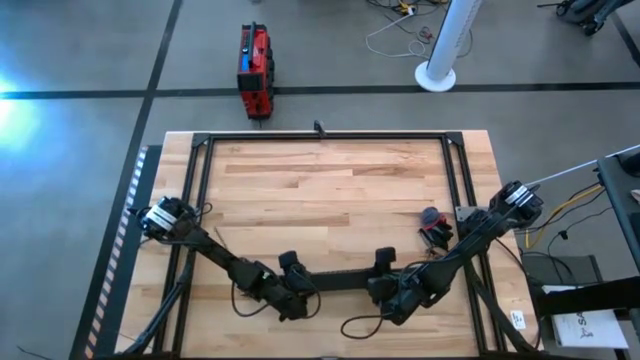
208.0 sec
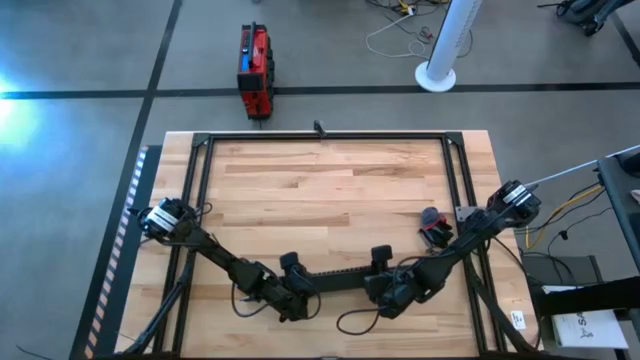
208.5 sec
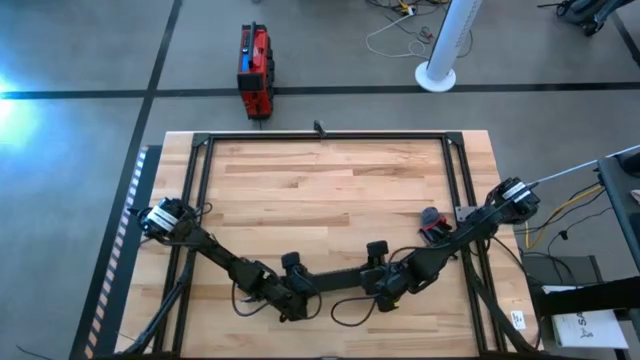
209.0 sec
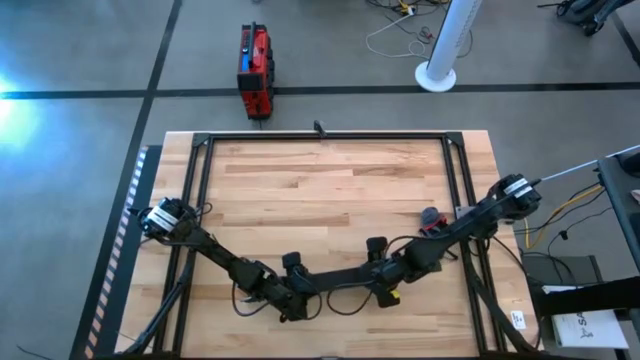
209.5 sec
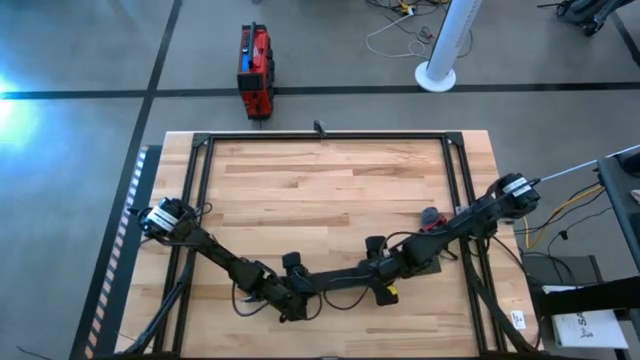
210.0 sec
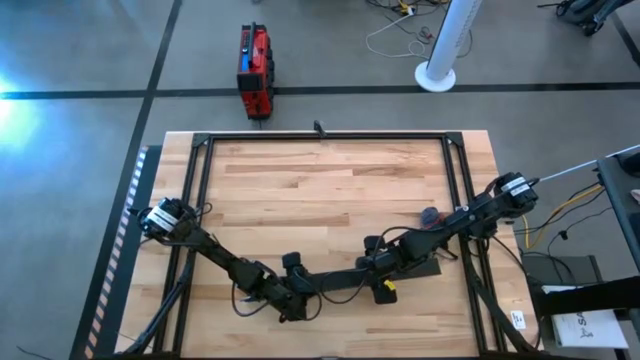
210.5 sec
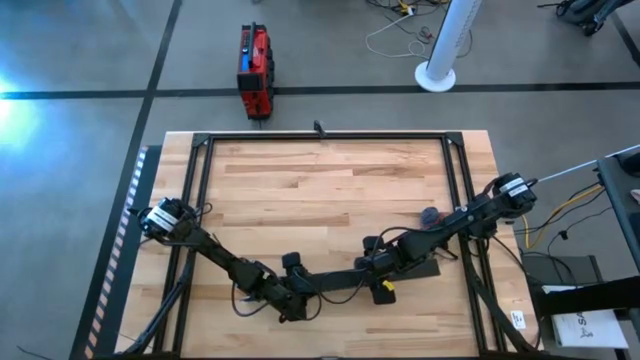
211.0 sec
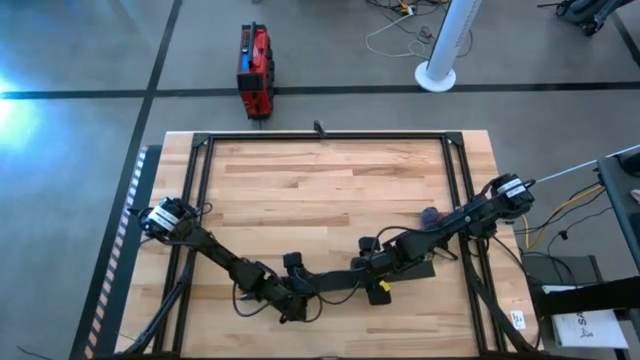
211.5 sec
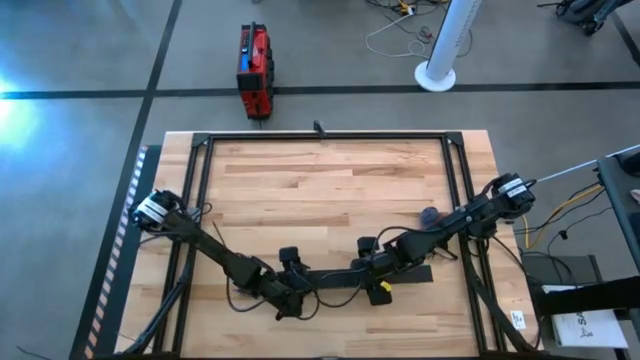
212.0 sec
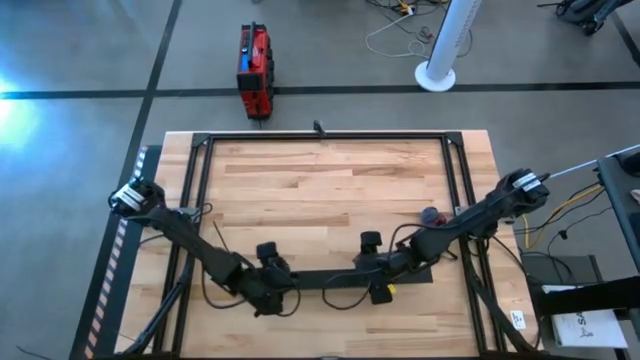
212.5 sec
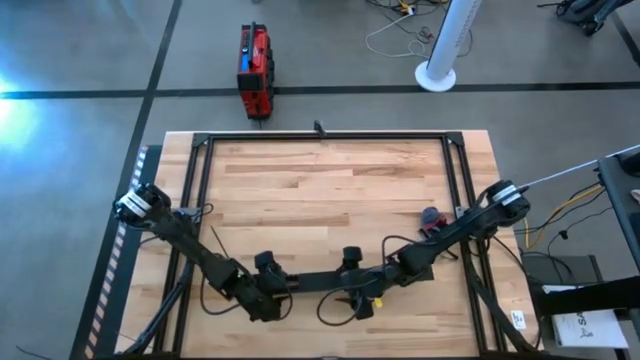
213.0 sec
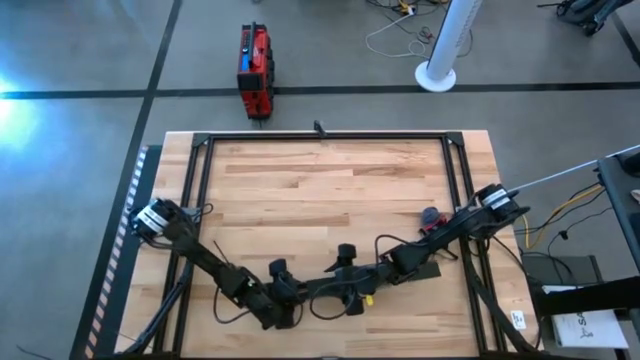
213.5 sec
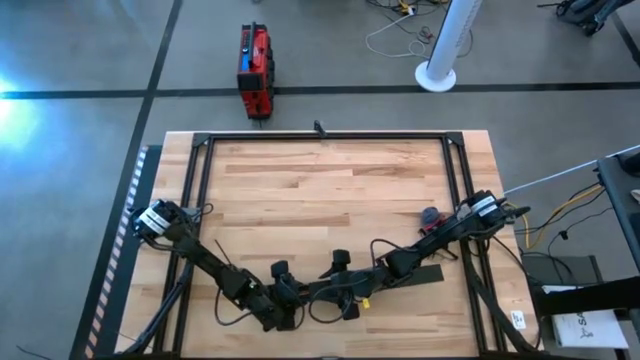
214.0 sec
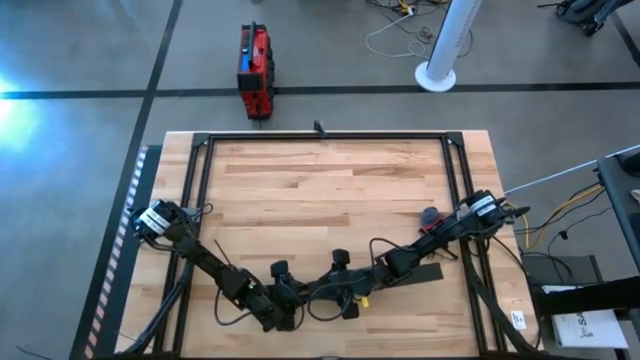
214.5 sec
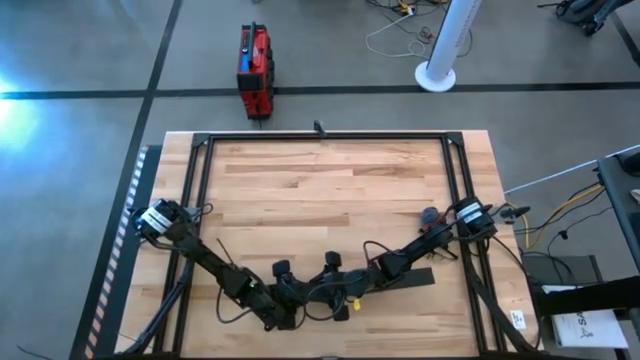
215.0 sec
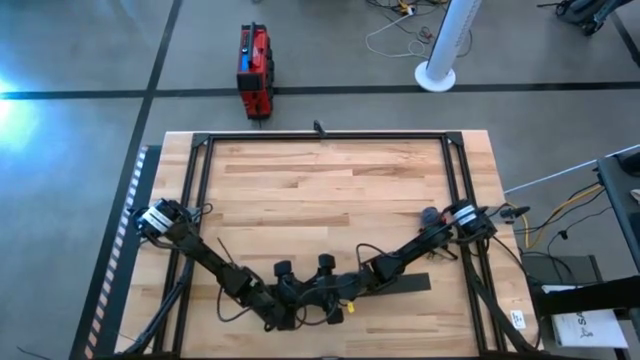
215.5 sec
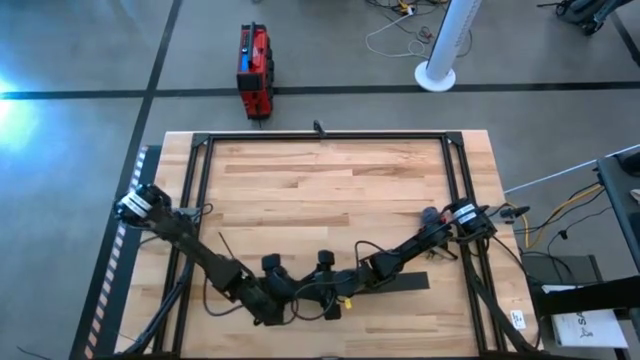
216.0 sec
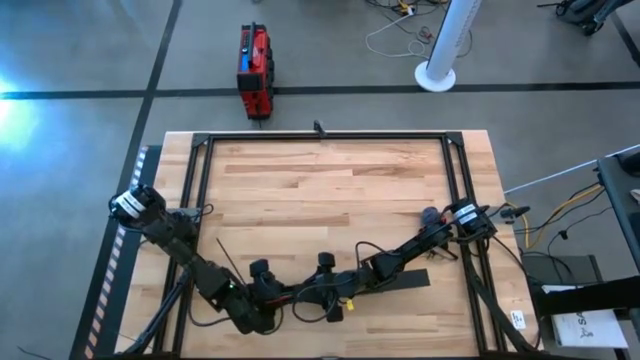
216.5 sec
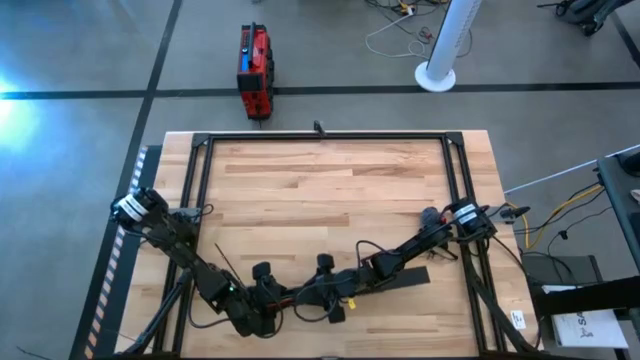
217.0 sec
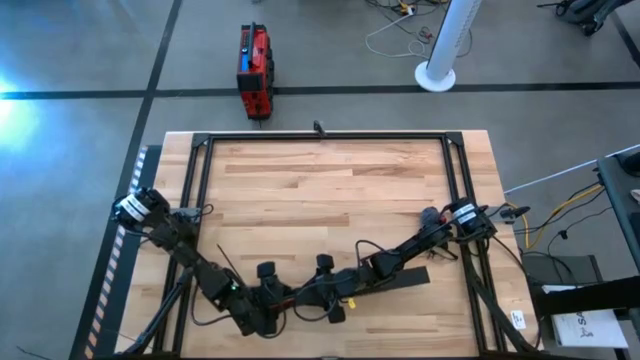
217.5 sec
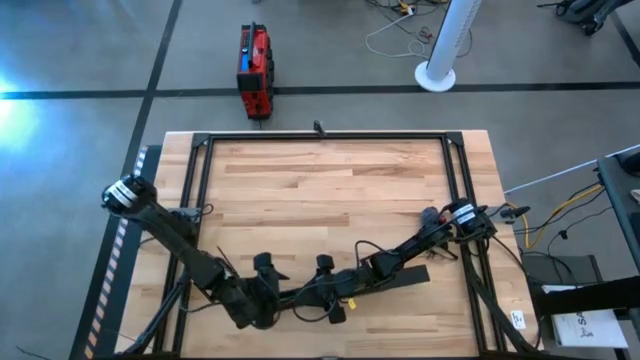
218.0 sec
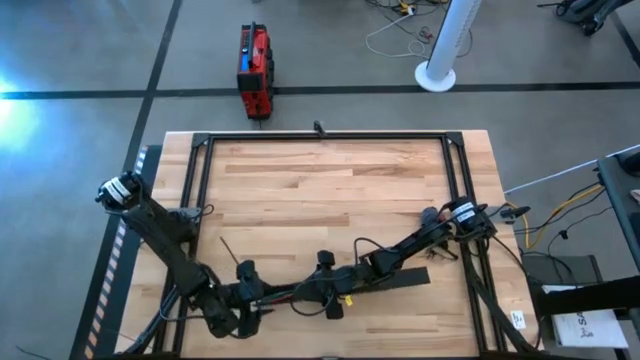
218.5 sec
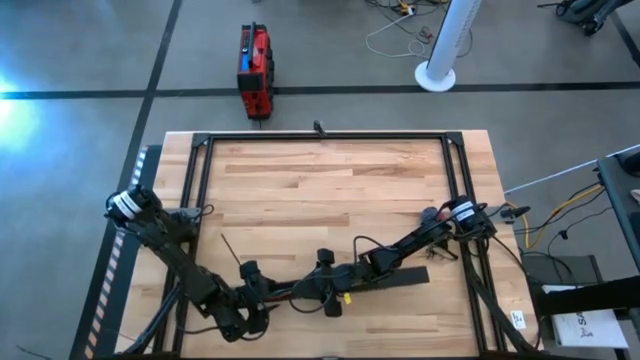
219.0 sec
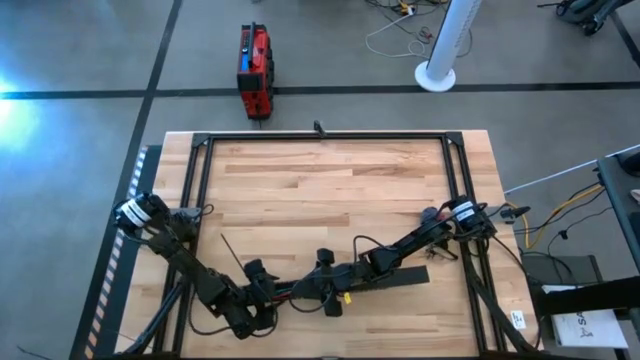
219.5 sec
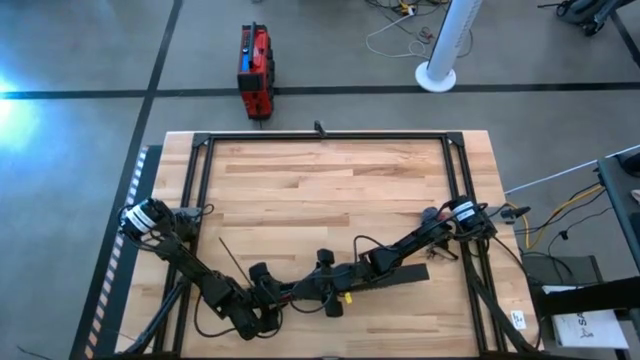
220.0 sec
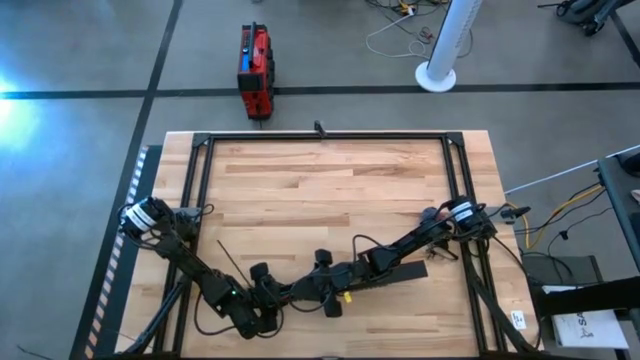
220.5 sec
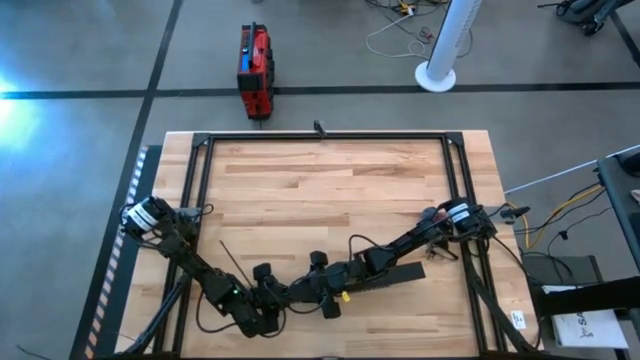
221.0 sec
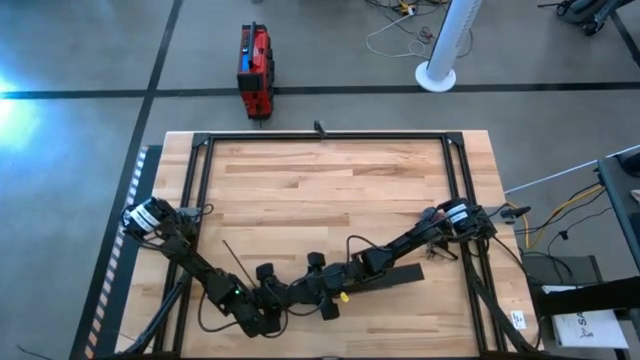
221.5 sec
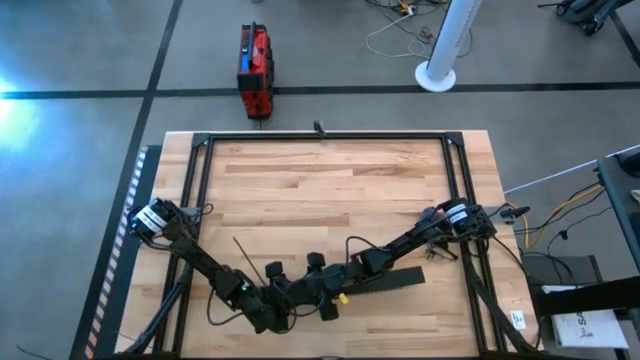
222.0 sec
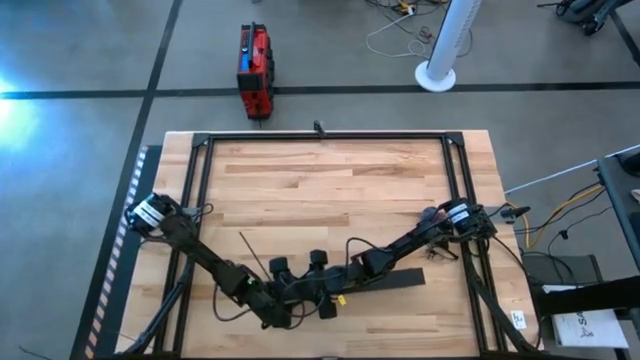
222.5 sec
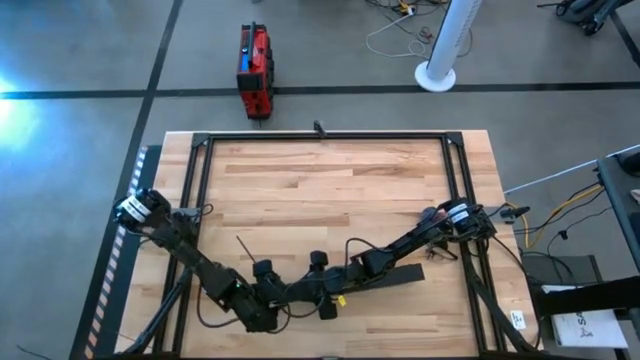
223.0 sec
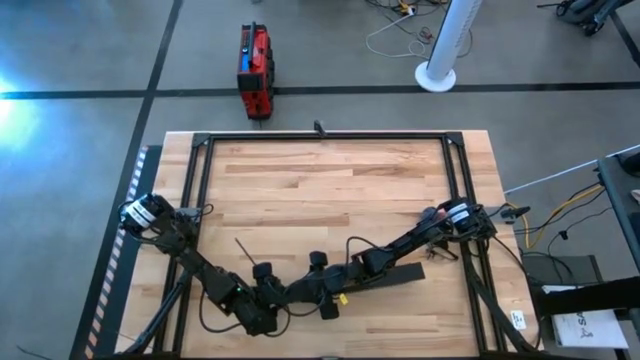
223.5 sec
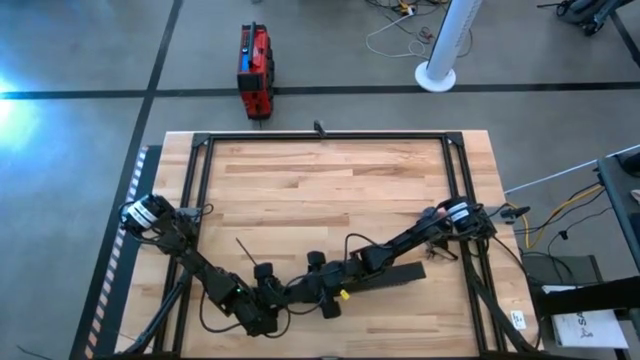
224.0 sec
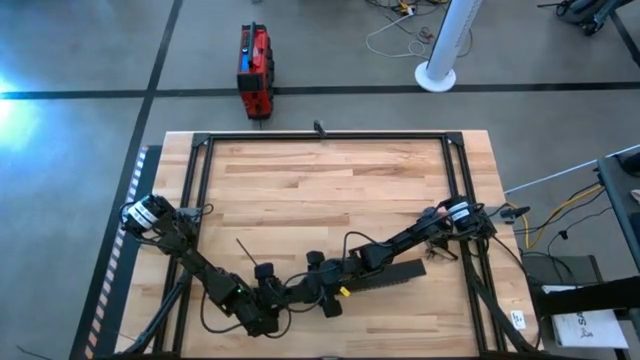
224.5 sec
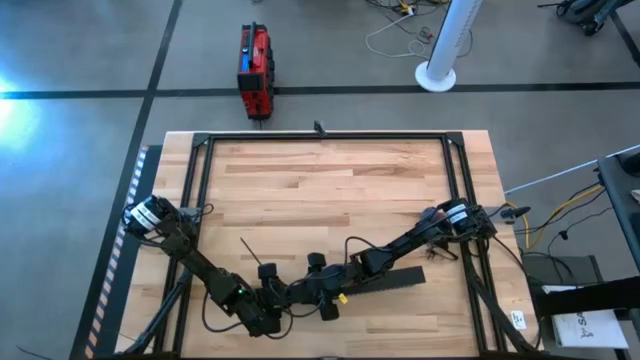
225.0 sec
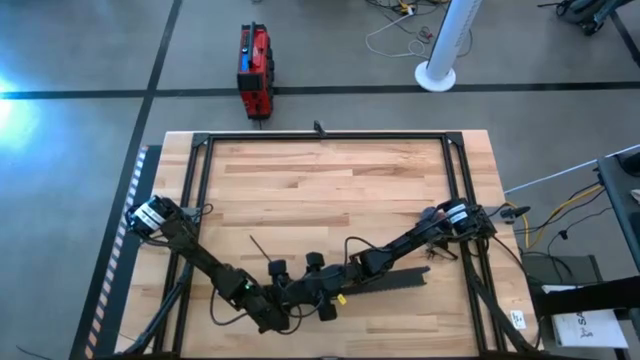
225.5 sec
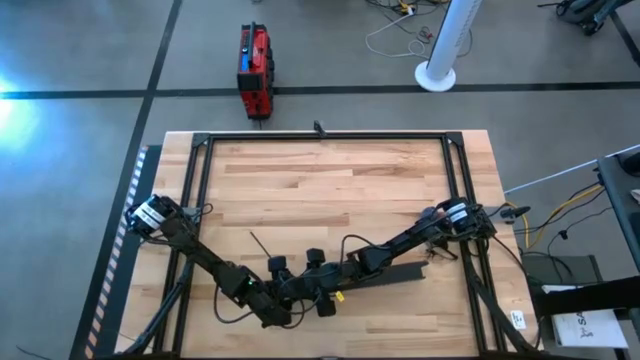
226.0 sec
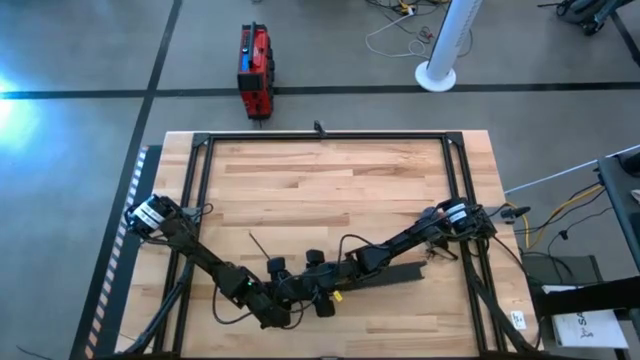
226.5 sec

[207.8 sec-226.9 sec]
Task: Ziptie cables
Close the cable duct using the cable lid

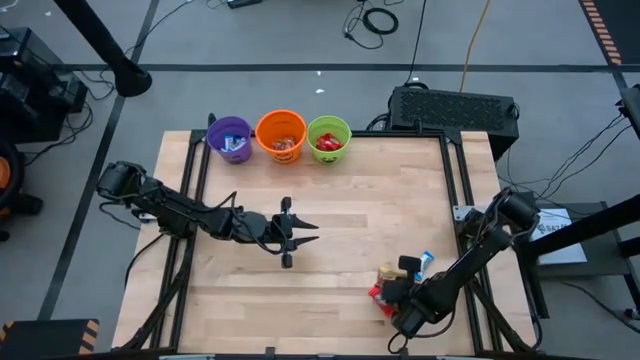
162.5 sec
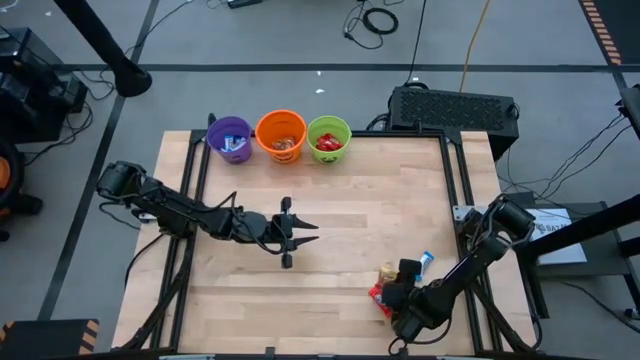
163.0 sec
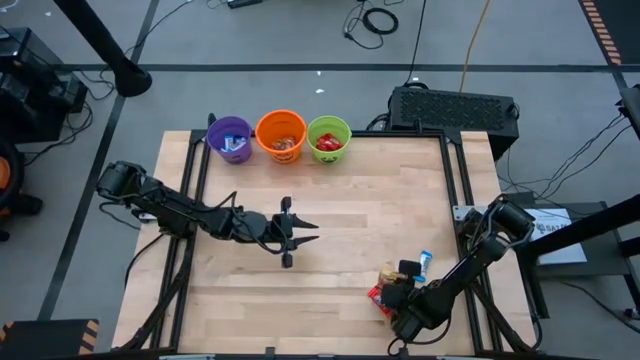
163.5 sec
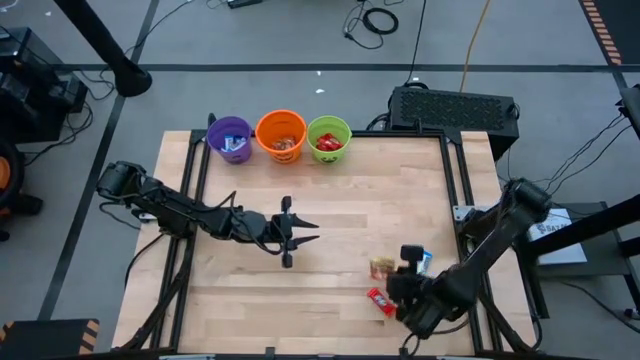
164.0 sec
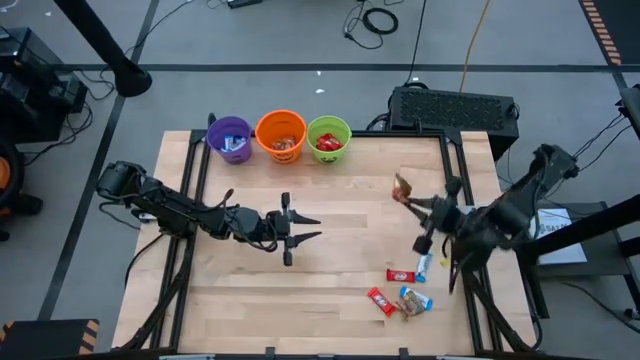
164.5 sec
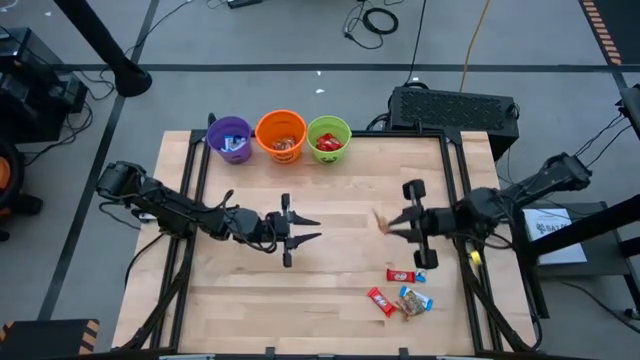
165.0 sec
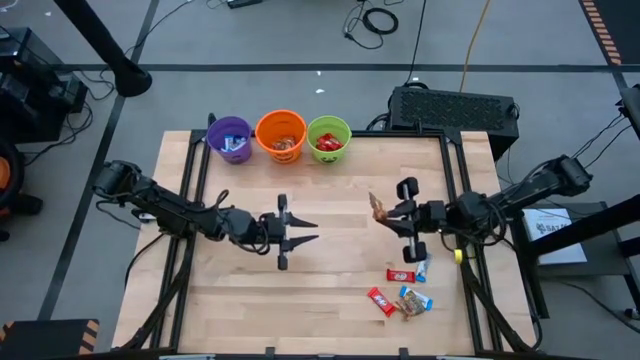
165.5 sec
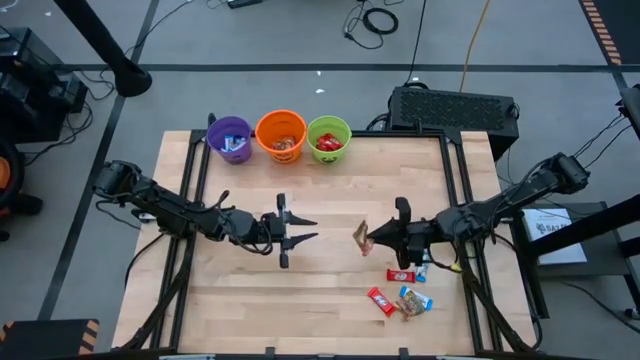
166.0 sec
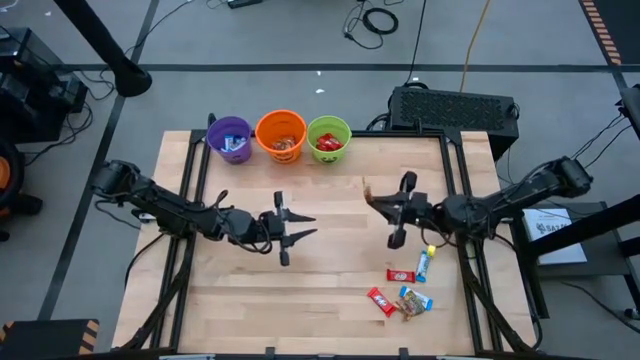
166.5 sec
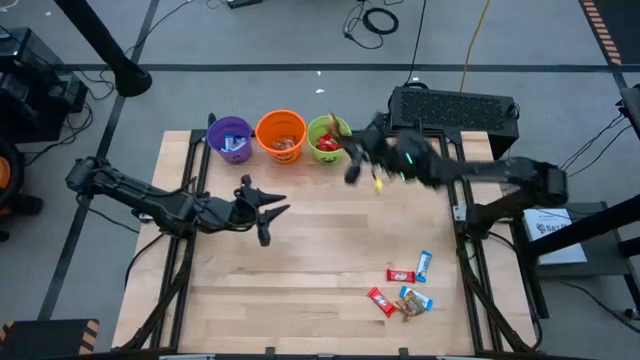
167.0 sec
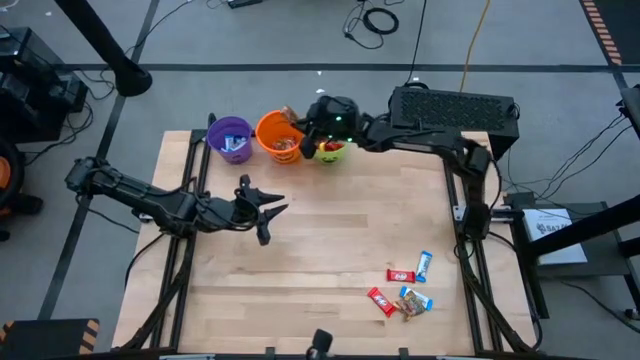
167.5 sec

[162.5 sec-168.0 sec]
Task: Sort candy by brand, put in halloween buckets
Put golden candy into the orange bucket
